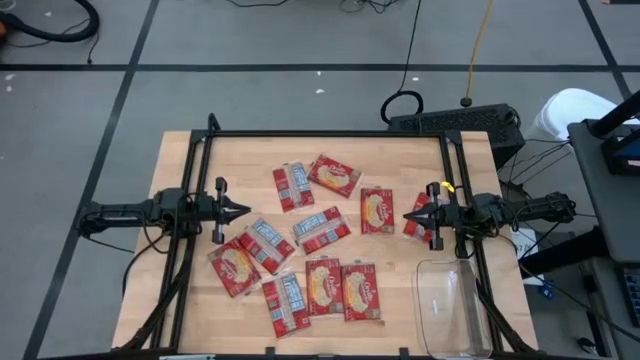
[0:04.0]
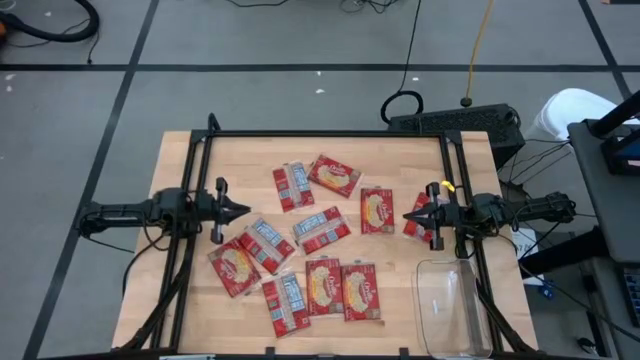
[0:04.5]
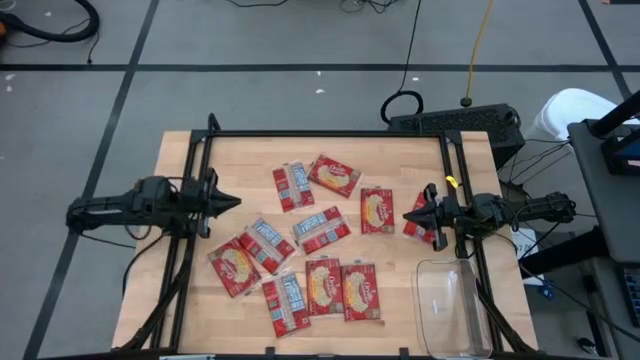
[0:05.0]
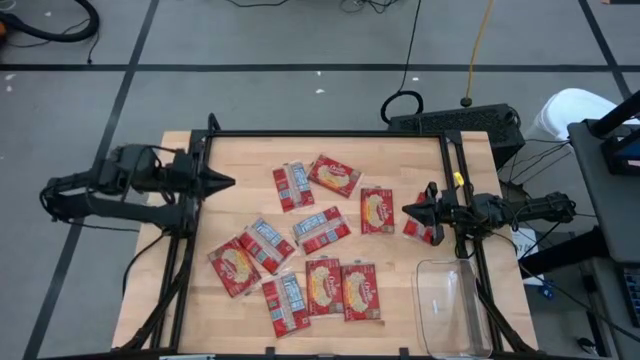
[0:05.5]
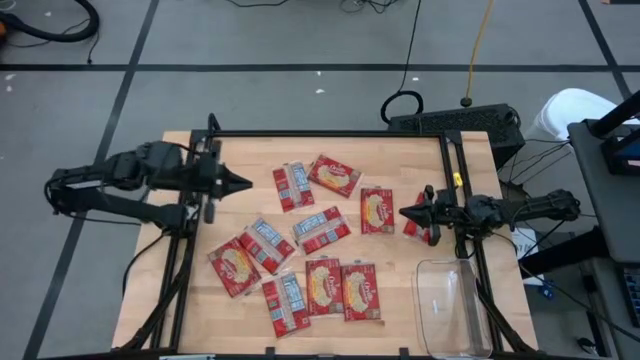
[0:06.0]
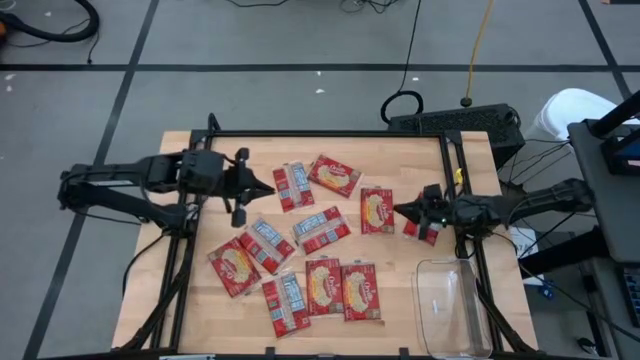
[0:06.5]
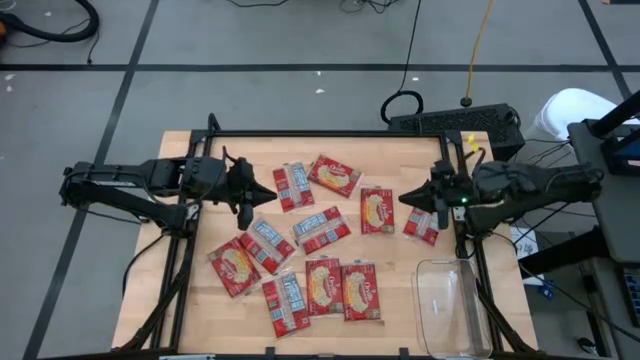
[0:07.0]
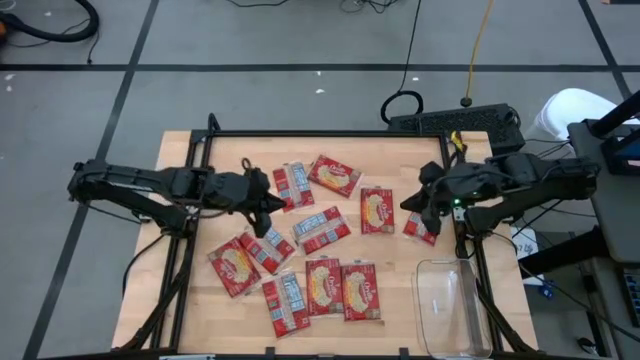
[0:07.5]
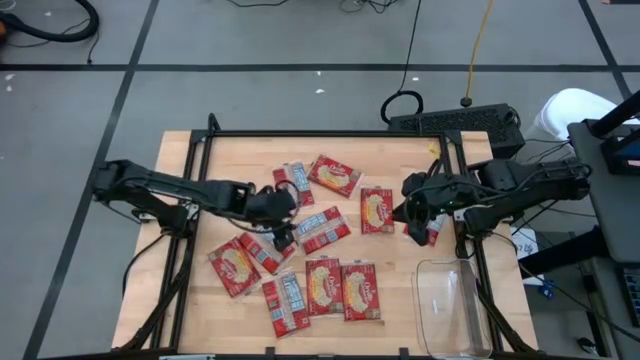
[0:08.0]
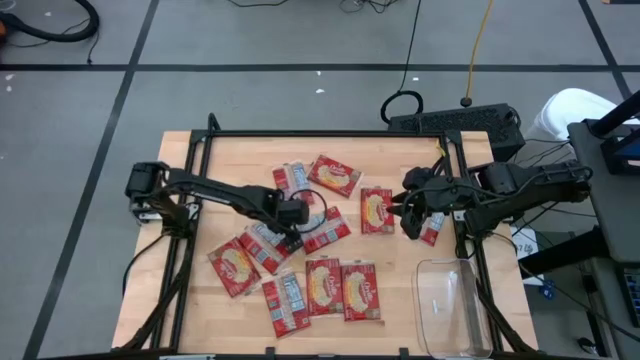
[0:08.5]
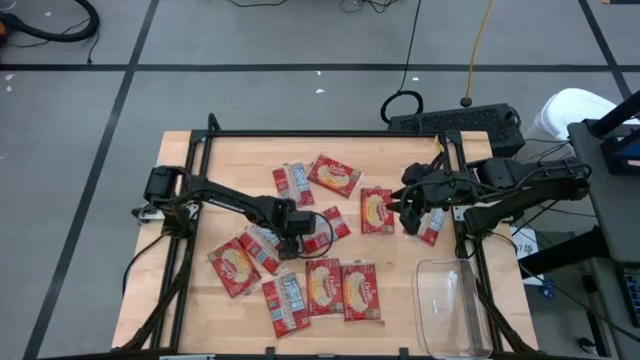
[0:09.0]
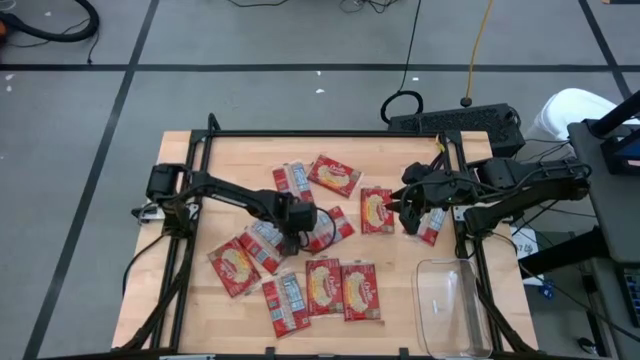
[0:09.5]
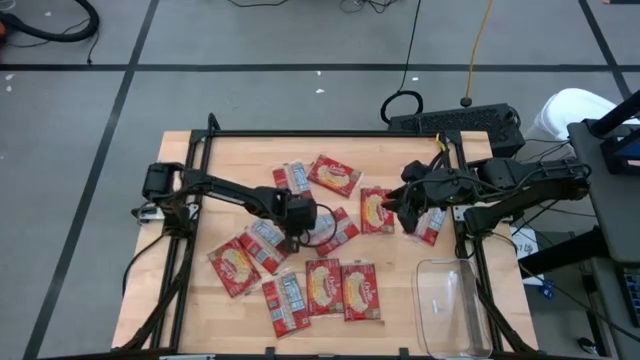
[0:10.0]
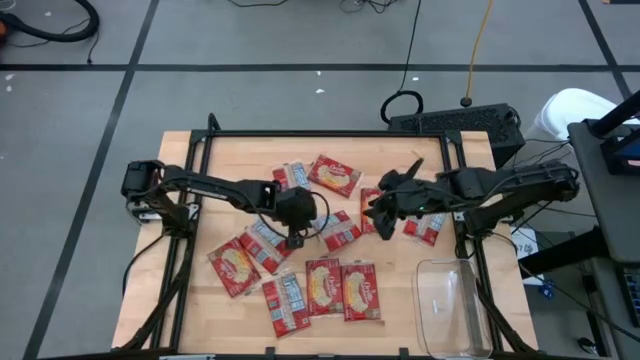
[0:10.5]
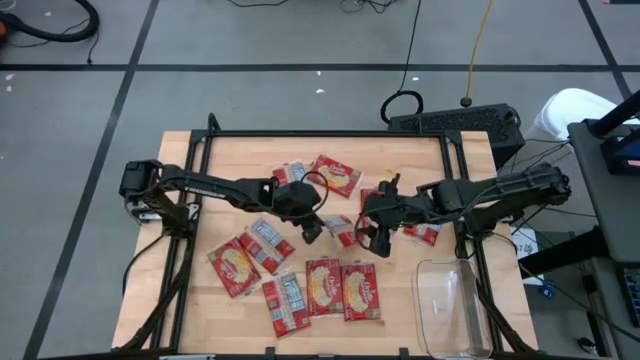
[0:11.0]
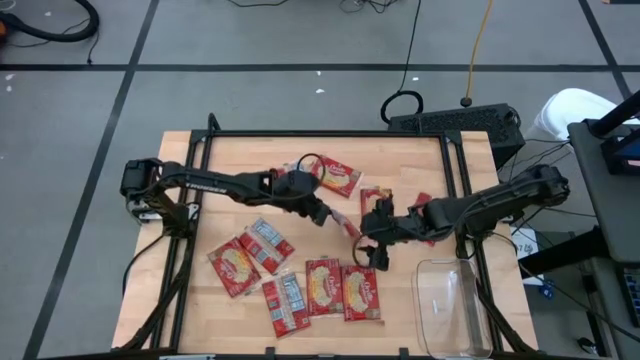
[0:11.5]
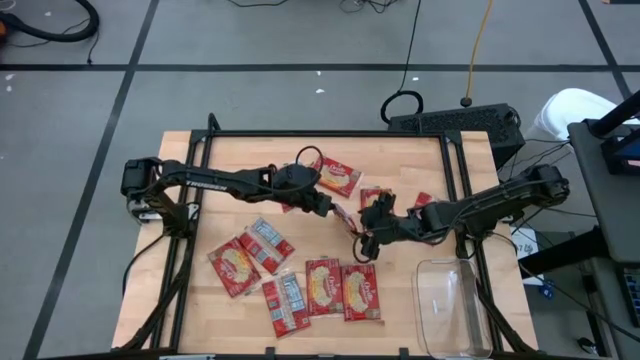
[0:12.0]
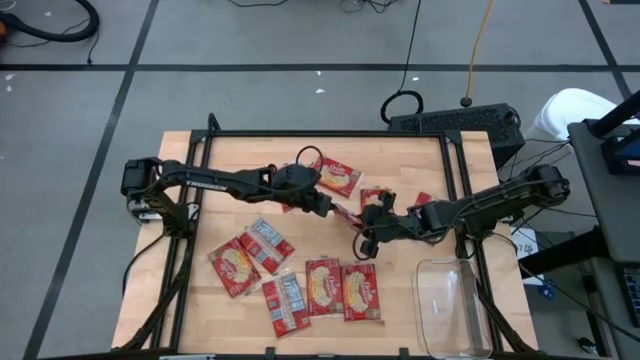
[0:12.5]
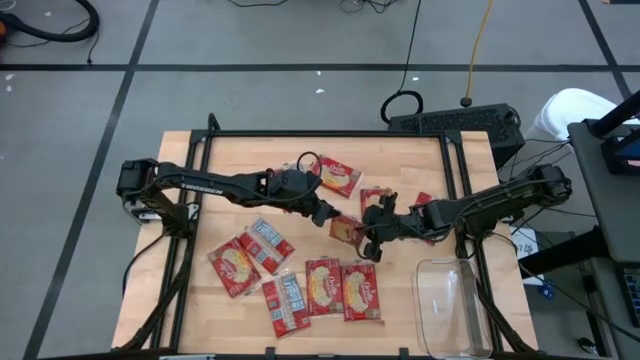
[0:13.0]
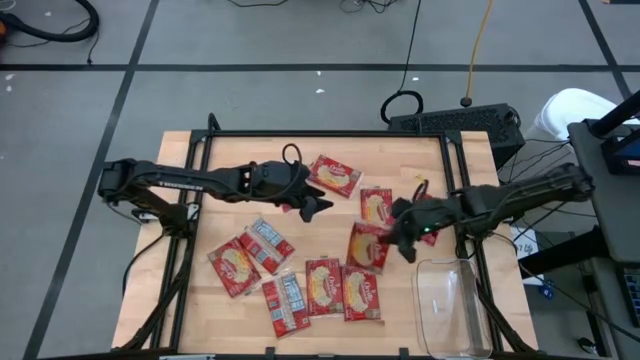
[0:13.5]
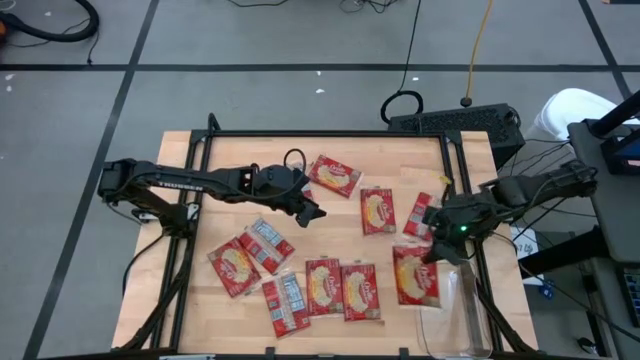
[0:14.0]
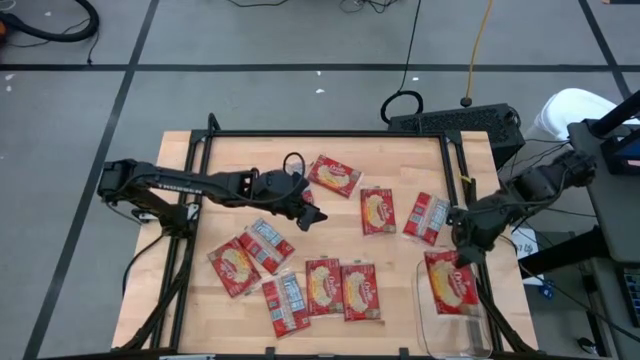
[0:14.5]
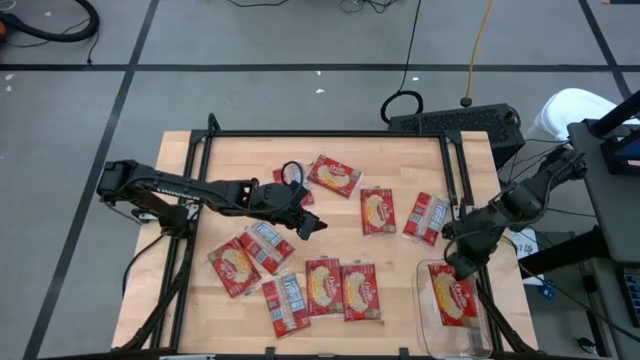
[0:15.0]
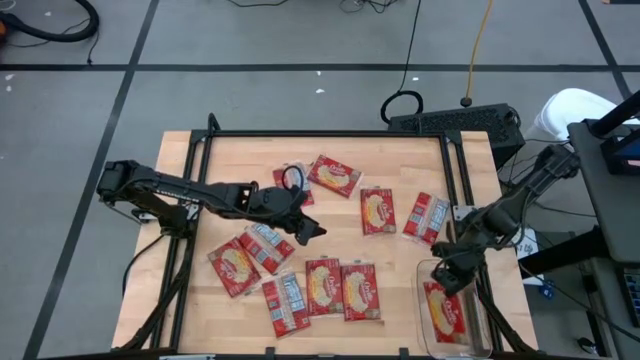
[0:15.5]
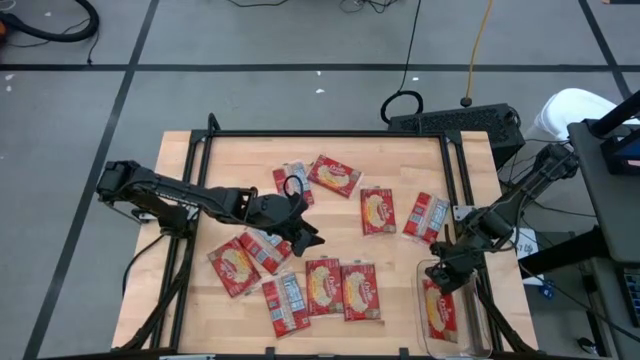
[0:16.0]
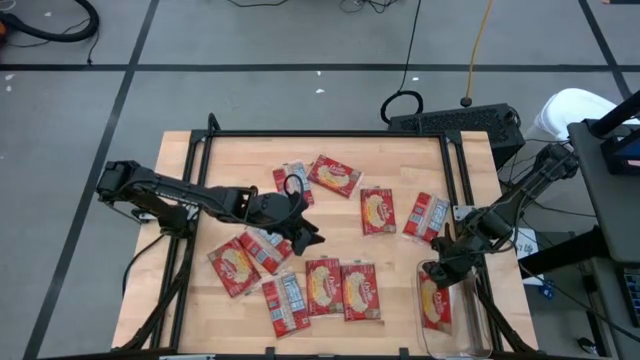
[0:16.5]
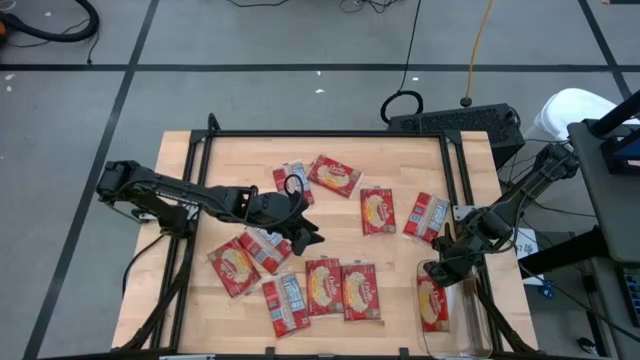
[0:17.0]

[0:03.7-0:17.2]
Task: Sort popcorn bags into baskets
Put the popcorn bag into the transparent bin

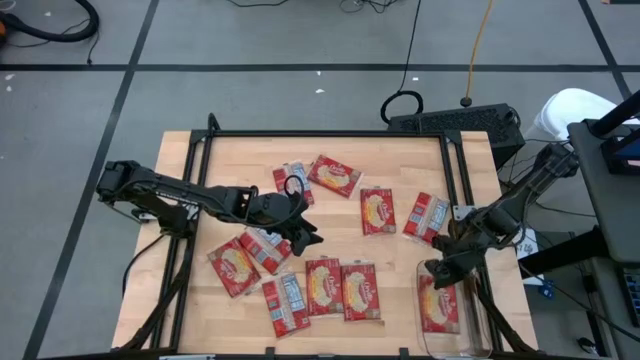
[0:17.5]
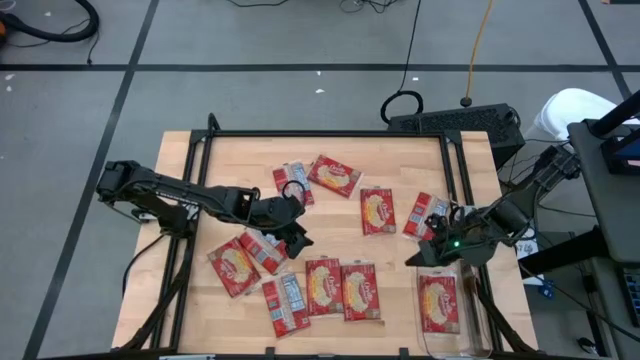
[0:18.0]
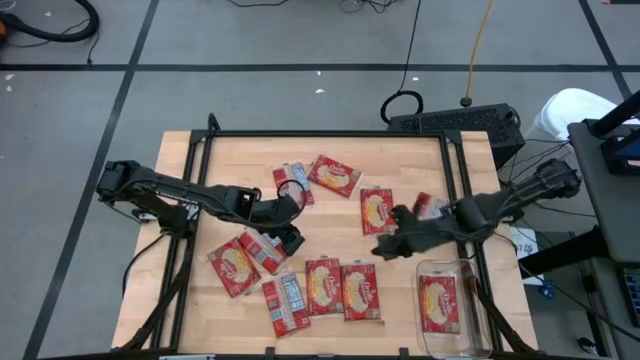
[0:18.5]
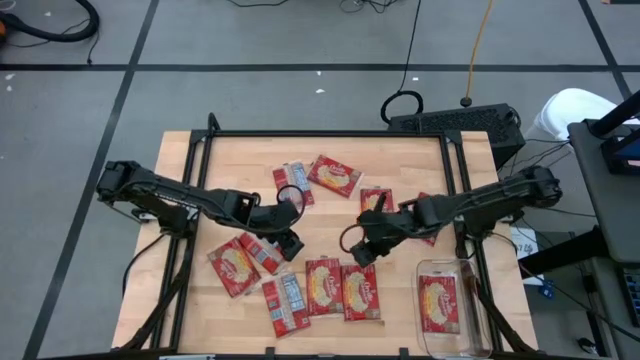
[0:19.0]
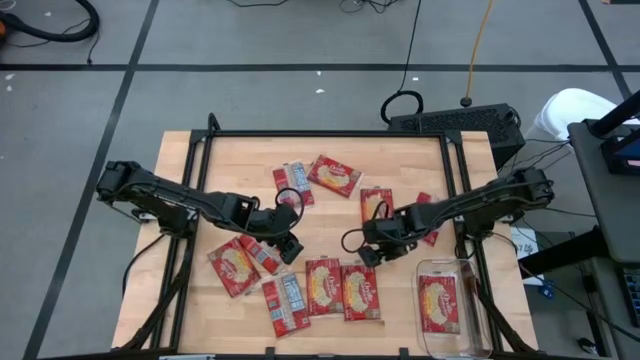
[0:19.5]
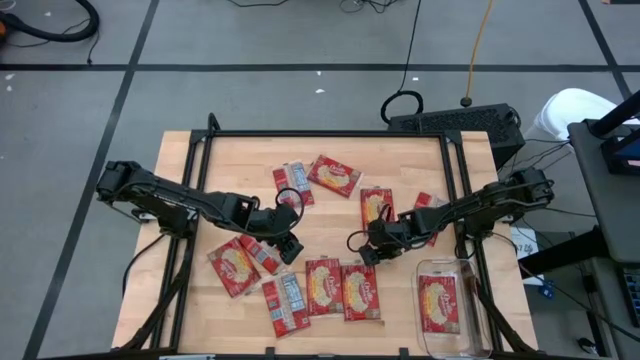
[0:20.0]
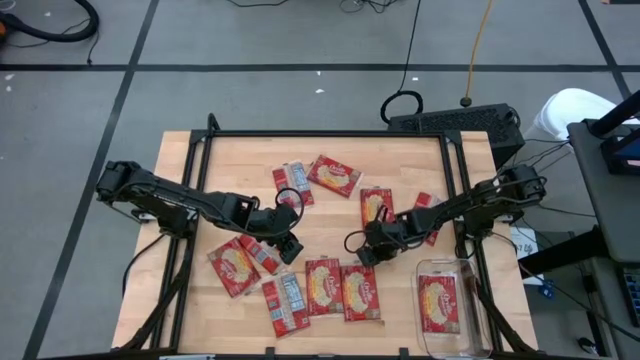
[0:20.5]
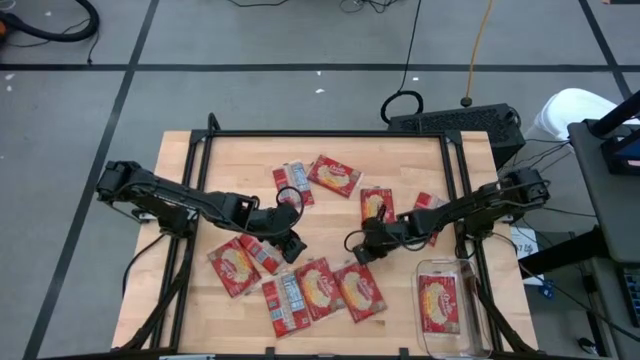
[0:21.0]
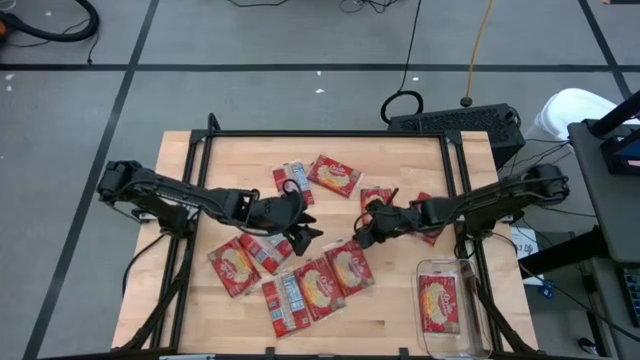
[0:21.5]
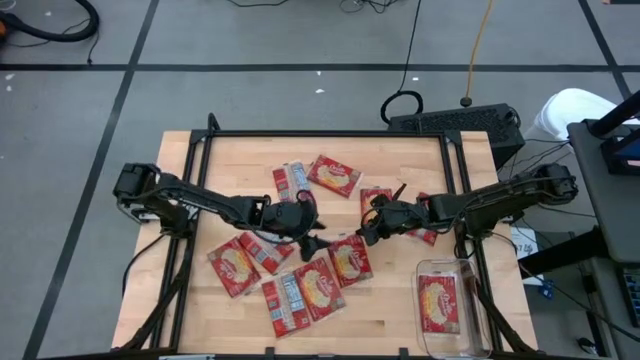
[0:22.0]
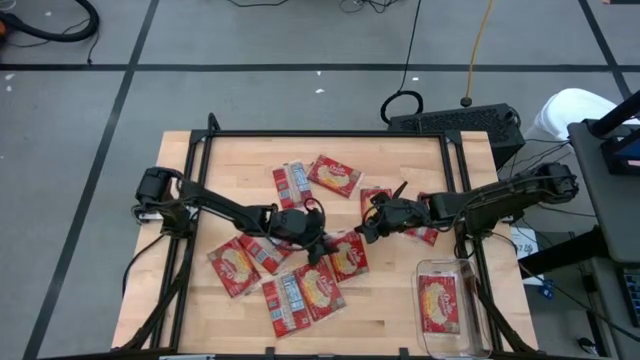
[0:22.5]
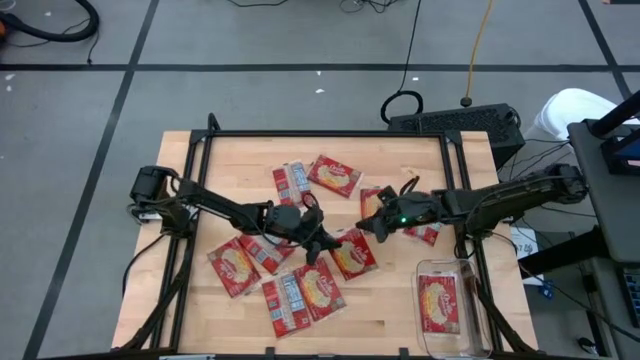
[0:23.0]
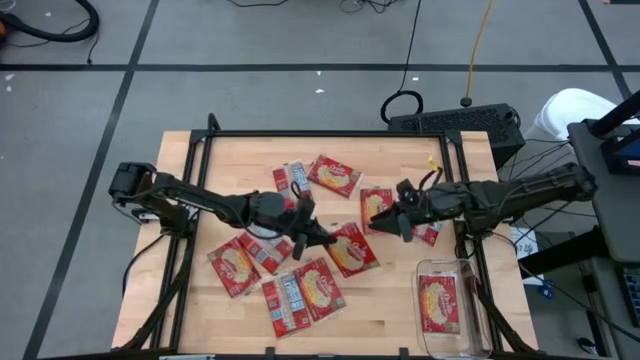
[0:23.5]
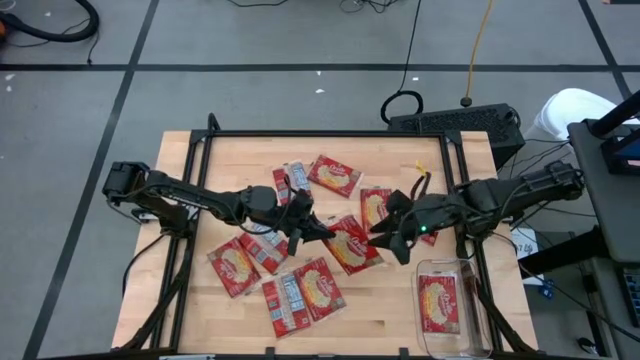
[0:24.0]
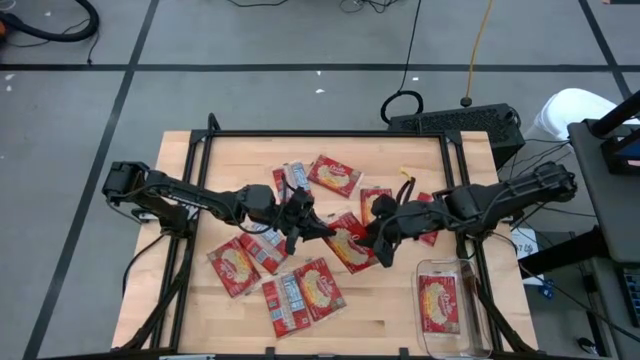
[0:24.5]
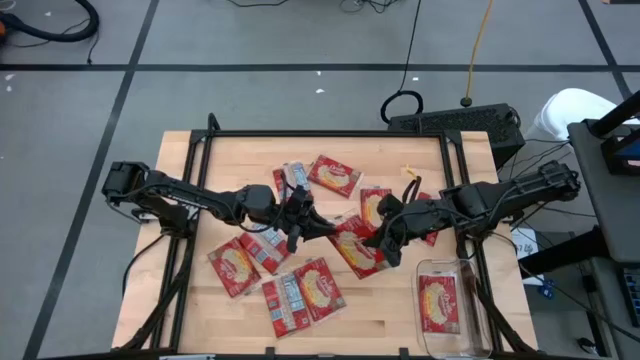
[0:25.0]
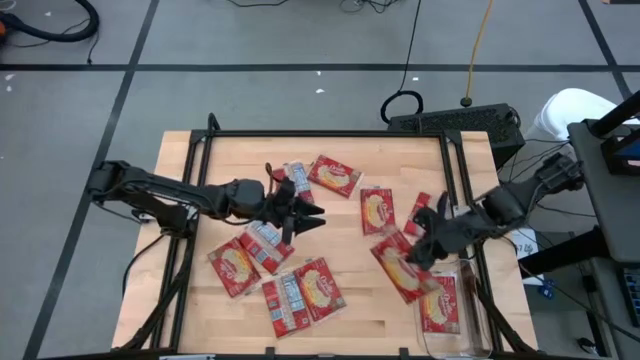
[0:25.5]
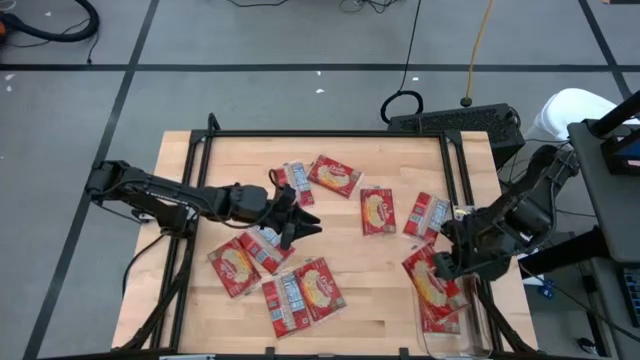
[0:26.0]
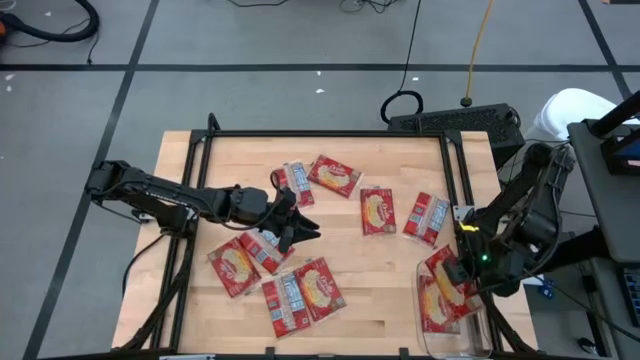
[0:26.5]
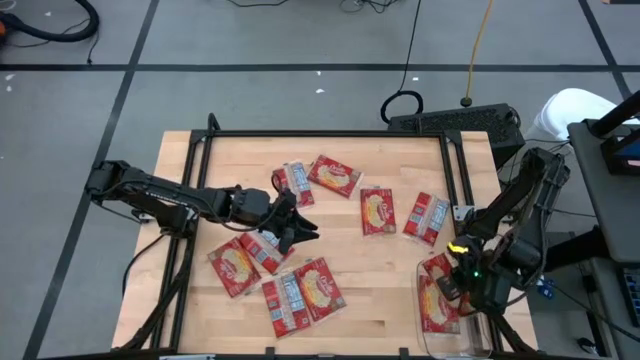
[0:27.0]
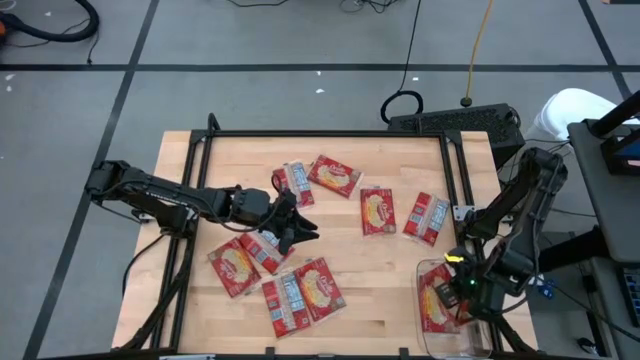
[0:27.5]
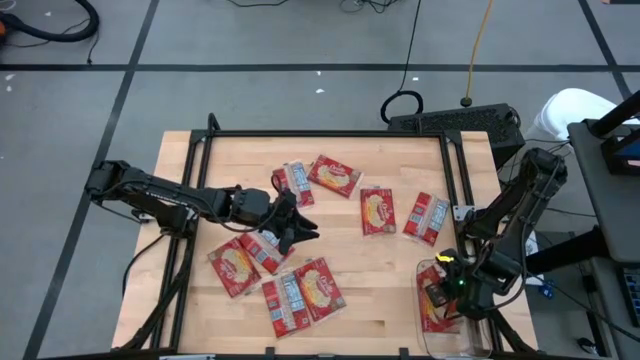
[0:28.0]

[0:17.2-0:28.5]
Put the popcorn bag into the transparent bin
